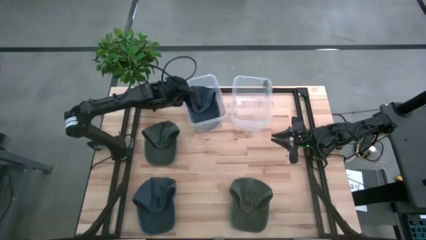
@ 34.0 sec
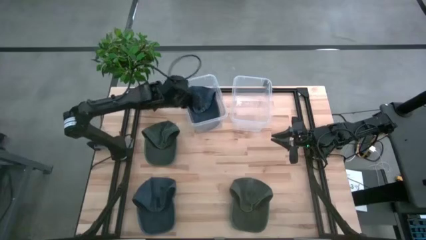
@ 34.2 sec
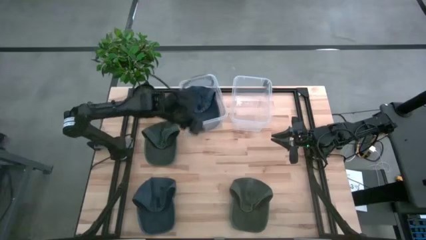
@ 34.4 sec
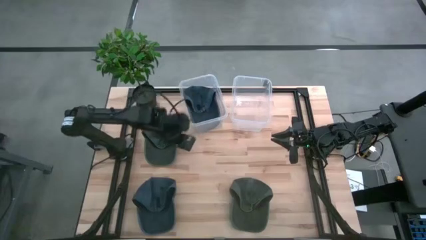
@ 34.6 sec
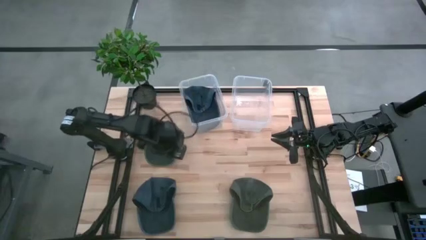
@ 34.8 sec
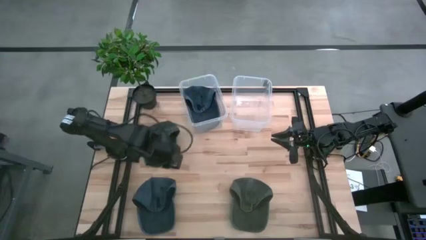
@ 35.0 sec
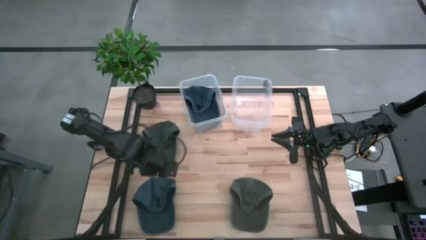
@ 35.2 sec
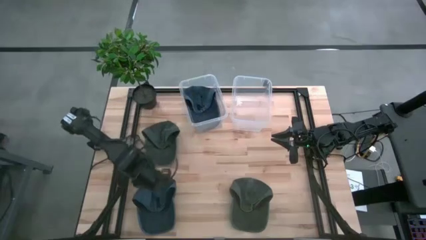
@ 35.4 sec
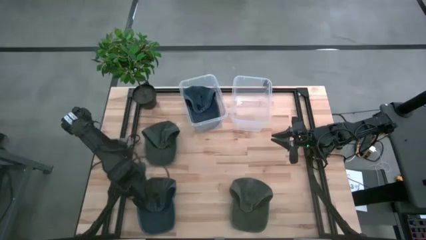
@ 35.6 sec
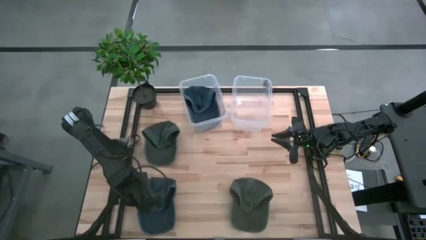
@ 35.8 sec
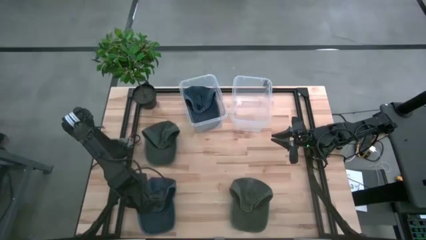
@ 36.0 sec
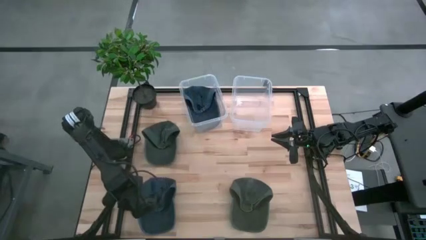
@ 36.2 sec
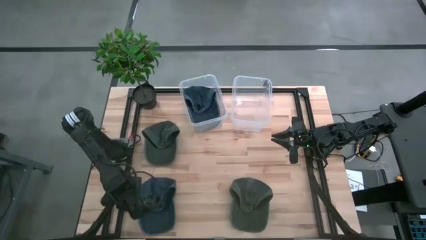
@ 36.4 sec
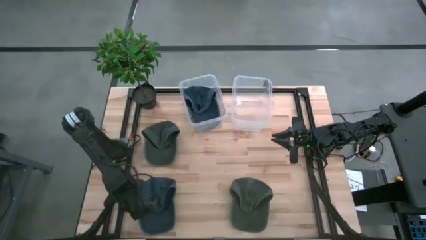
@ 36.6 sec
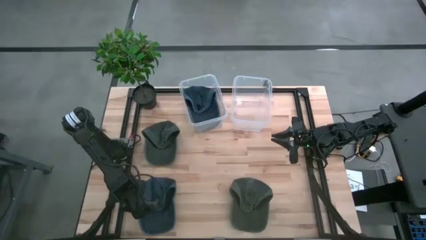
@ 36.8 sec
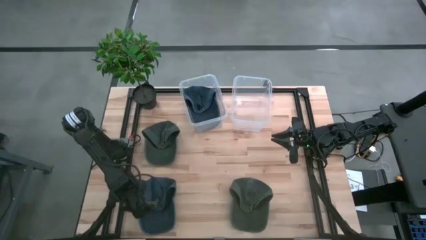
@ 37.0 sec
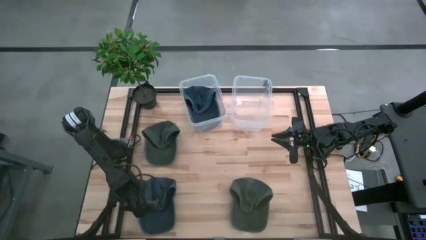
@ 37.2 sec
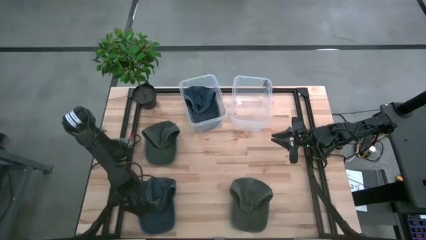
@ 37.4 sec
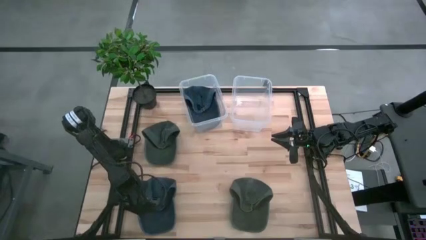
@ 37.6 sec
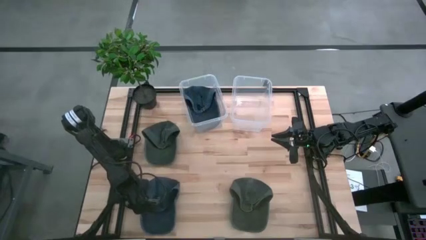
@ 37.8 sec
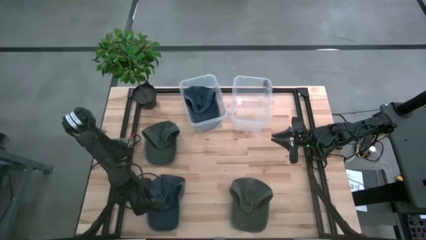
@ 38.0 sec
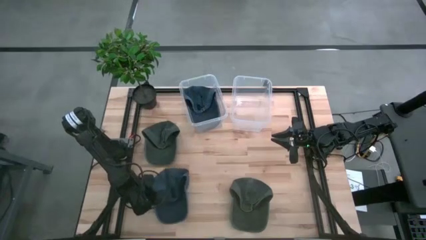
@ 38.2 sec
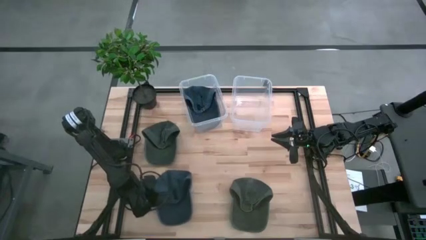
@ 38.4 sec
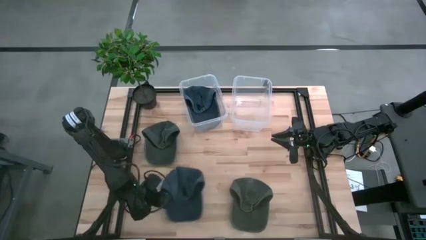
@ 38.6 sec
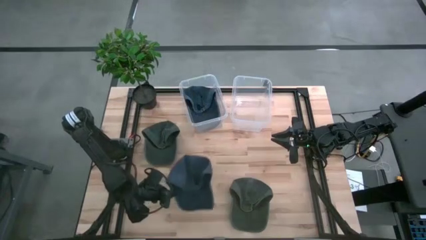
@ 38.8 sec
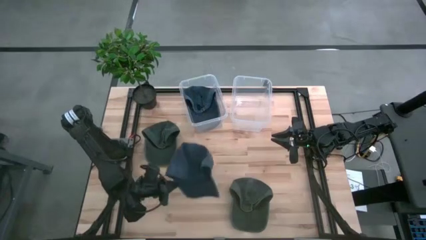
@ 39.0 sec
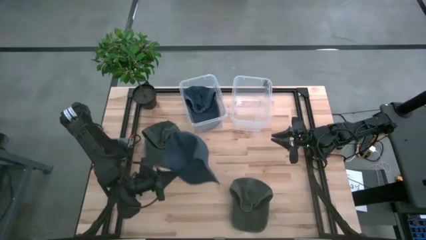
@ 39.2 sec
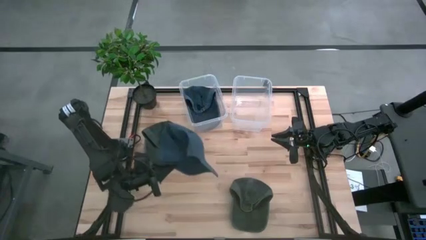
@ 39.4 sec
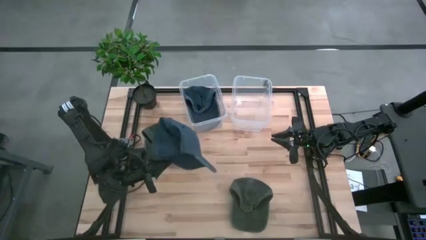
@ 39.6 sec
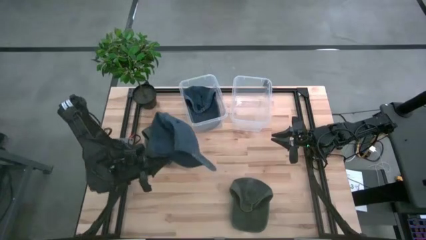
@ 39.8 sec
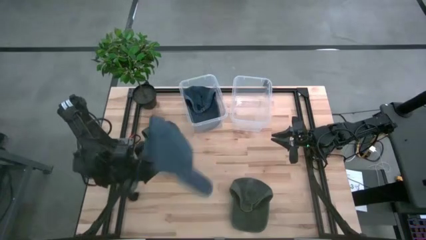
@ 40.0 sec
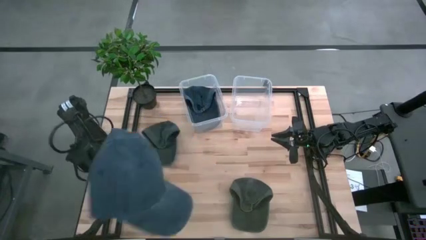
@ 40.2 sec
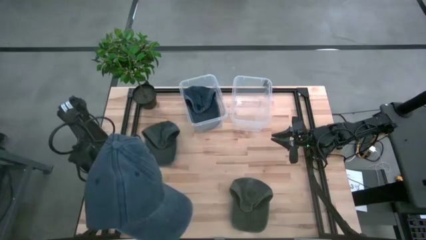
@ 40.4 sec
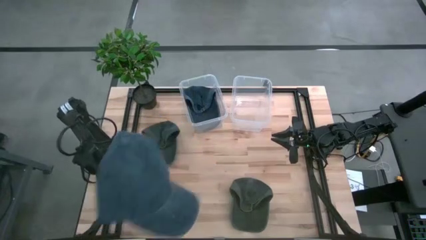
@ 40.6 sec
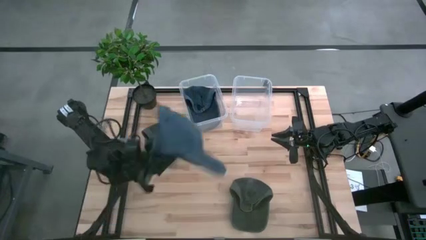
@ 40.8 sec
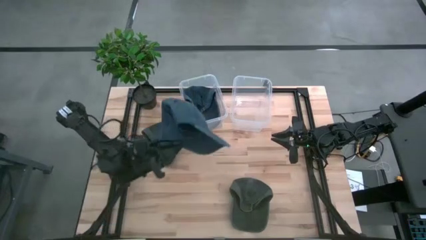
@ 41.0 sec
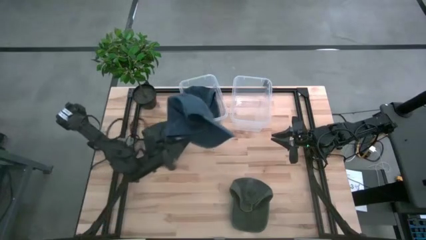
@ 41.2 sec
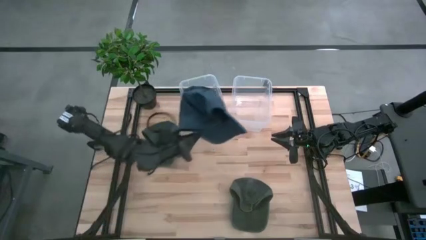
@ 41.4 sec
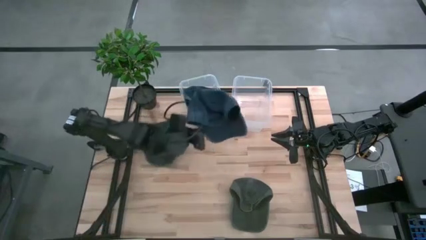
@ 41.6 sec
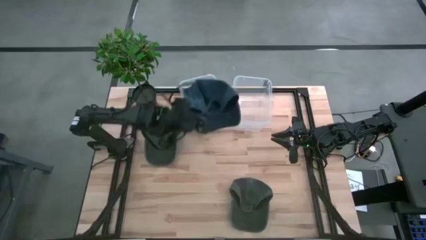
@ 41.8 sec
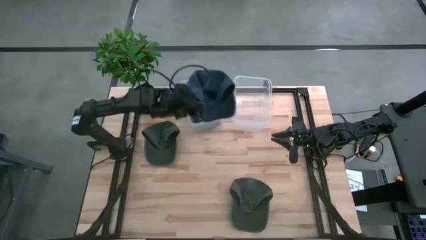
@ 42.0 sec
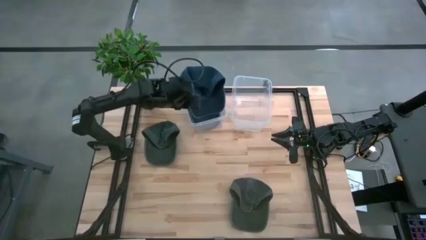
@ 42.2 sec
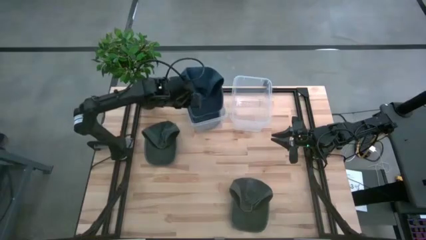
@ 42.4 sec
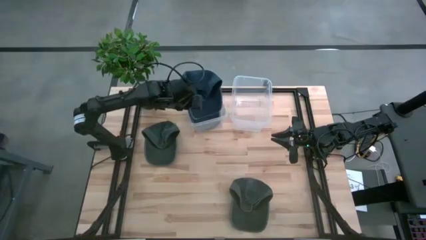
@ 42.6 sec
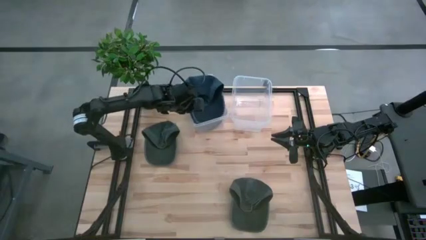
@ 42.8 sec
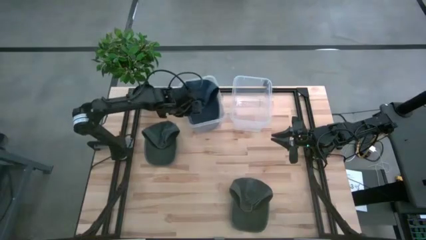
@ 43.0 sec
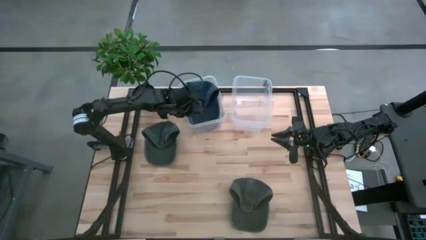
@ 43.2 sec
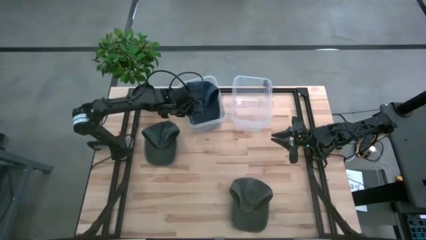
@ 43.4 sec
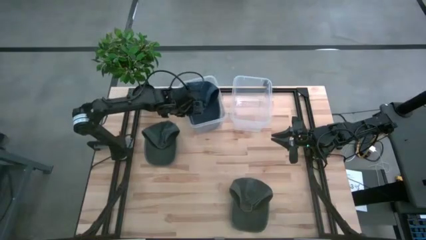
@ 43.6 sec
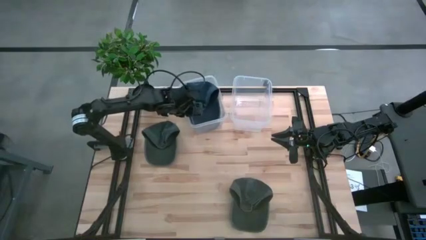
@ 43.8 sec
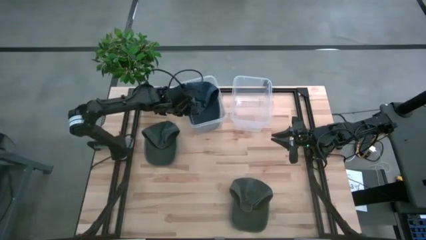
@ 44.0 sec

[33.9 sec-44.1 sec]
Task: Pick & Place hat
Put the blue cap into the left transparent bin
